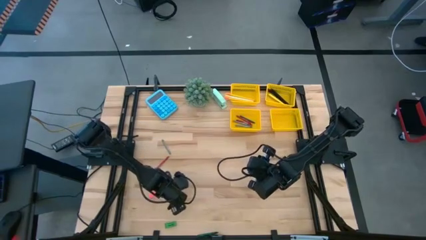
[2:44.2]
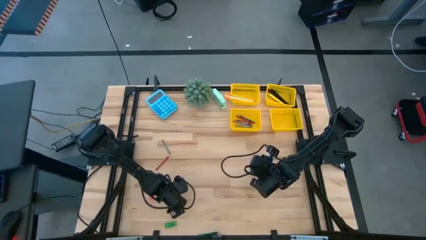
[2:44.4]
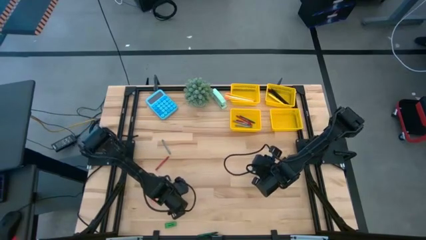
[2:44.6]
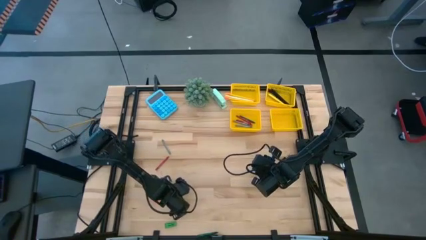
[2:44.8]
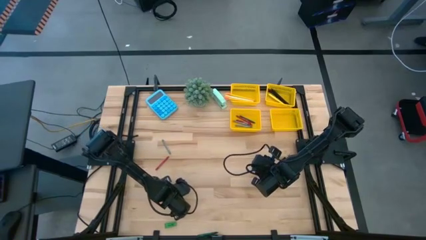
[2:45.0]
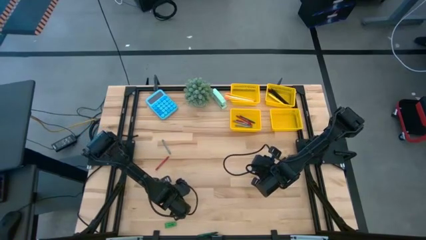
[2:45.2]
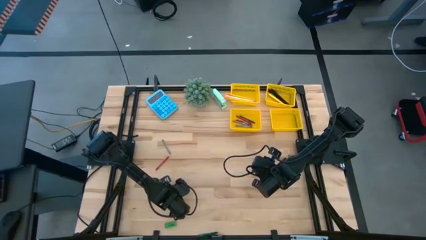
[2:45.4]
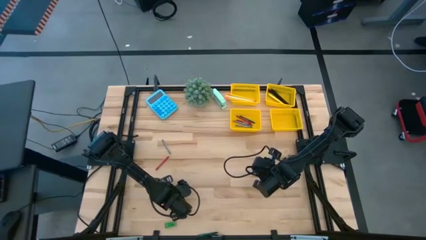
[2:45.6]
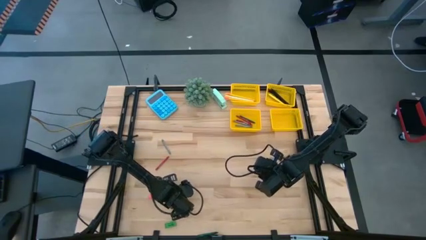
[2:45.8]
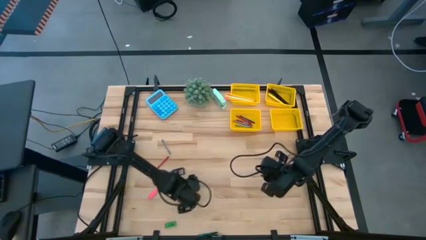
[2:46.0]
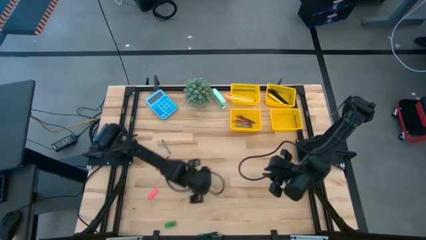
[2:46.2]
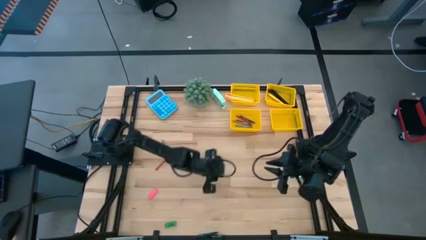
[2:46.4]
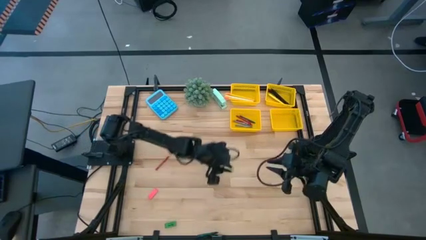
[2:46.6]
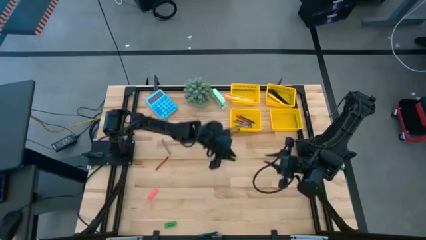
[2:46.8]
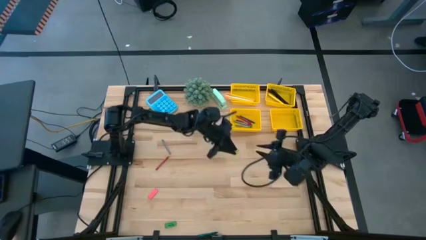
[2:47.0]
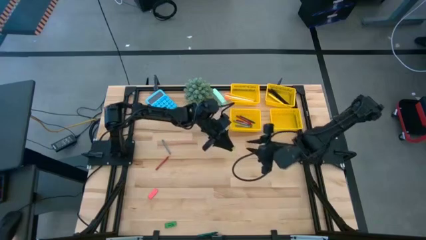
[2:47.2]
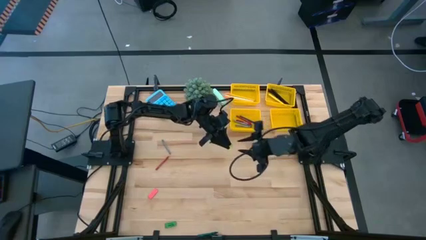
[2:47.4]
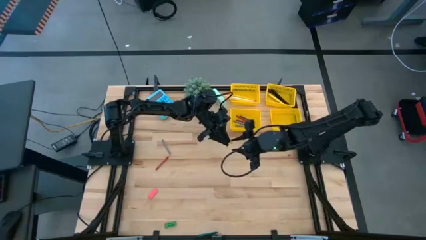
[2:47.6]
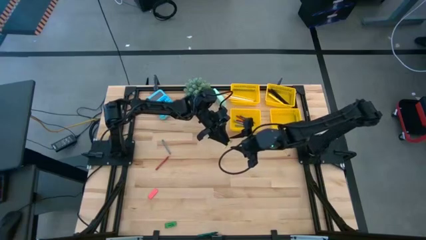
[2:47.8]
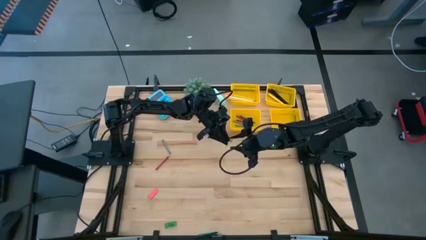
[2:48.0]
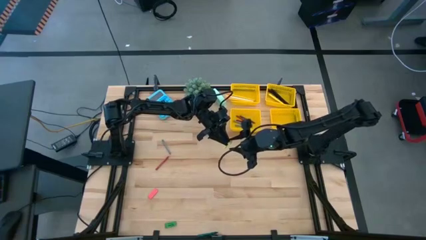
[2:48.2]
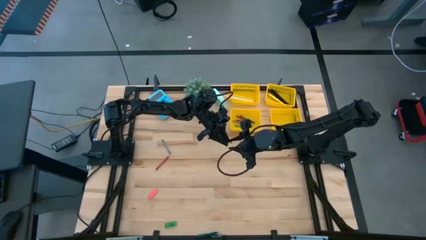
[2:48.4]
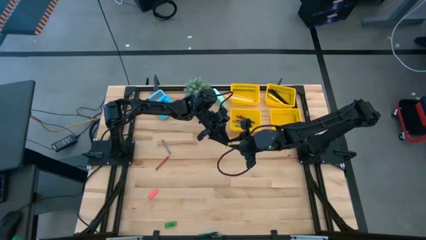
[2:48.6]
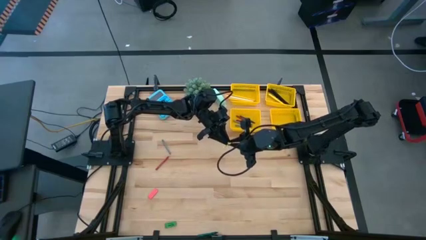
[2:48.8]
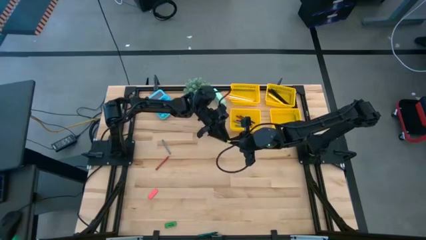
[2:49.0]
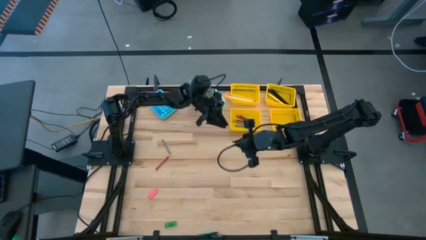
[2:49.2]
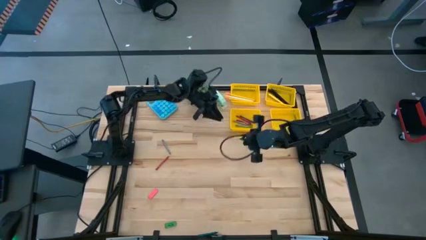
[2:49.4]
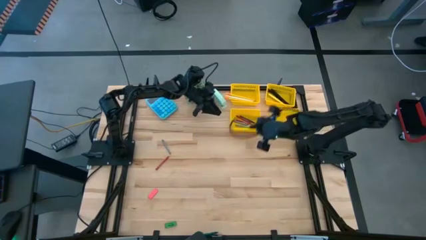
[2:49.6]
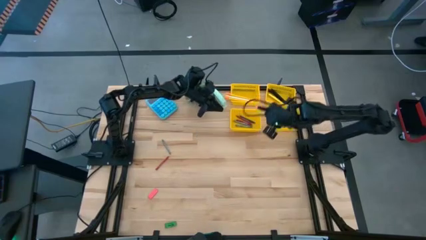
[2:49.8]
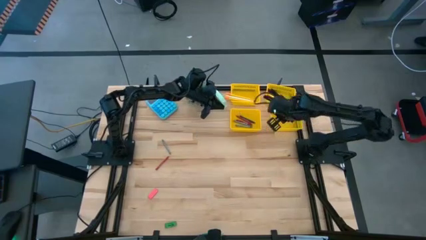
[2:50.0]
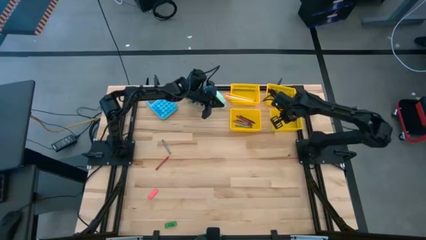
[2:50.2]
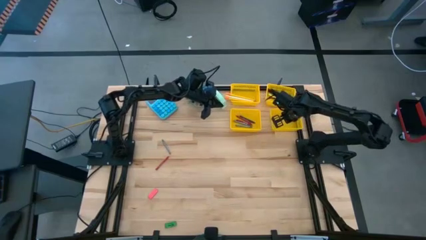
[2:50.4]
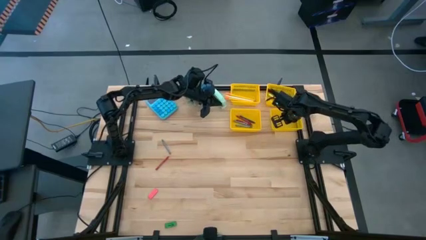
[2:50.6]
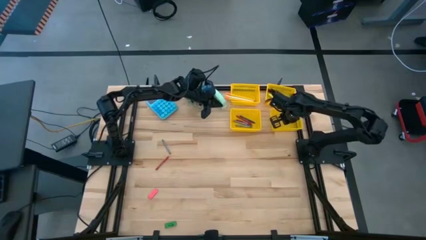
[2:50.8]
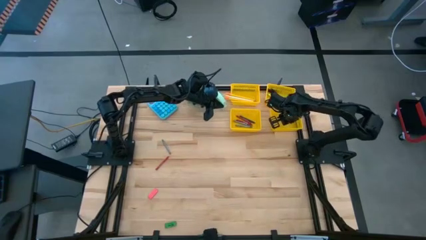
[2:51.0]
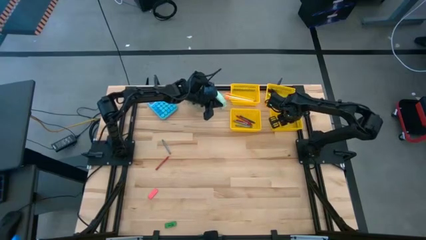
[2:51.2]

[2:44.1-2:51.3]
Task: Sort crayons/erasers/pens/pencils in bins
Put the yellow eraser into the bottom right yellow bin

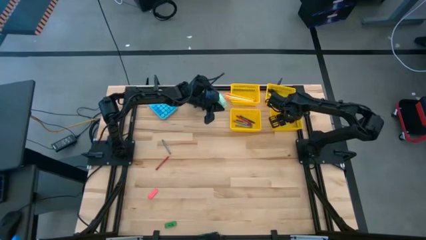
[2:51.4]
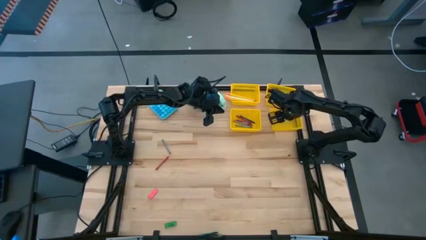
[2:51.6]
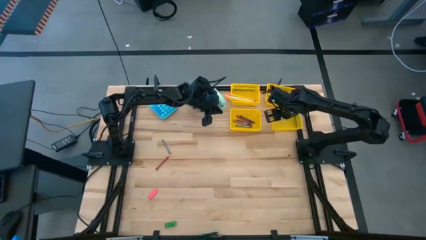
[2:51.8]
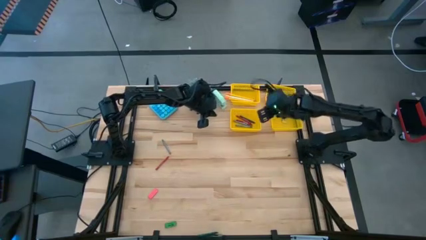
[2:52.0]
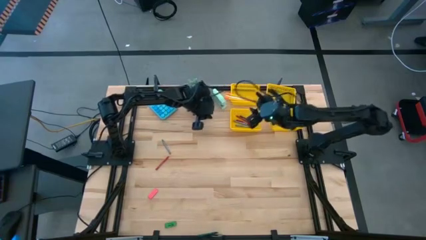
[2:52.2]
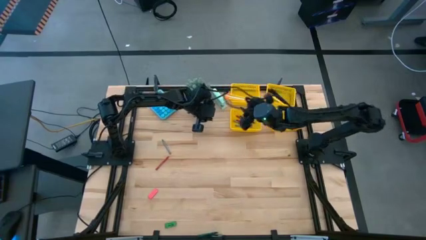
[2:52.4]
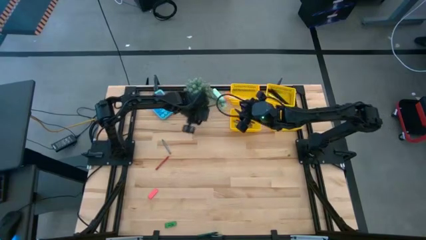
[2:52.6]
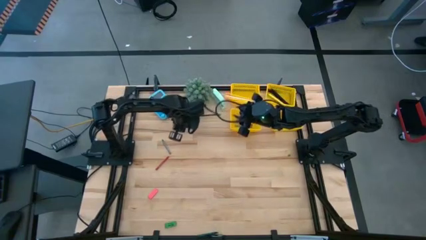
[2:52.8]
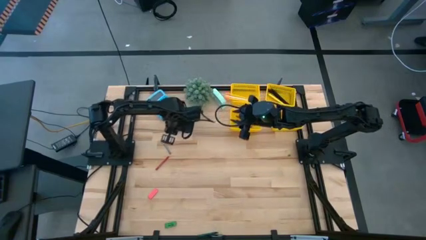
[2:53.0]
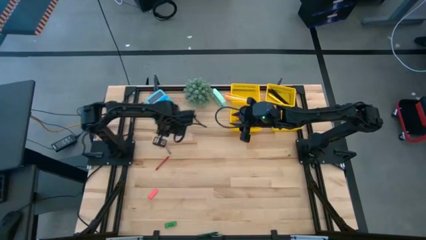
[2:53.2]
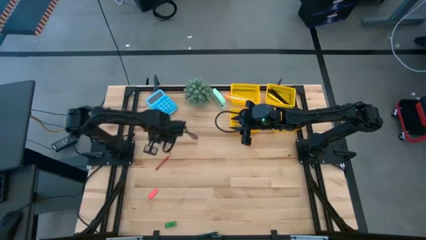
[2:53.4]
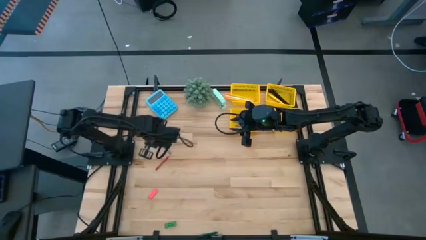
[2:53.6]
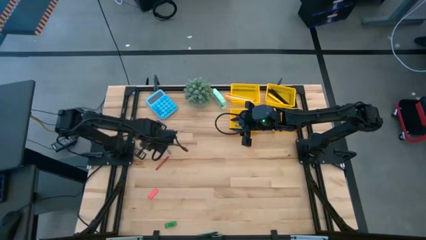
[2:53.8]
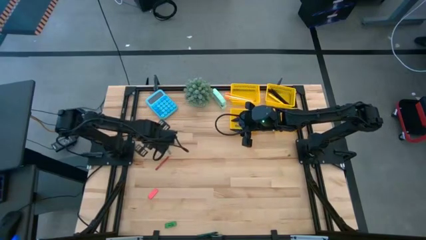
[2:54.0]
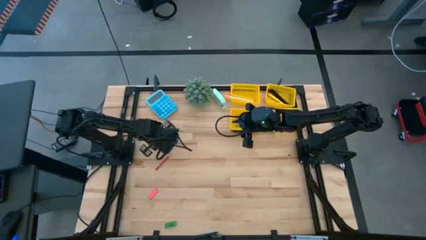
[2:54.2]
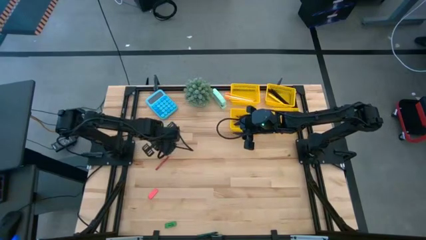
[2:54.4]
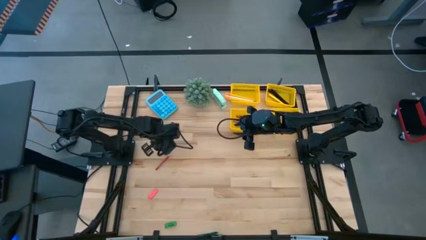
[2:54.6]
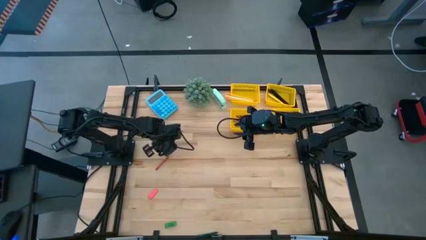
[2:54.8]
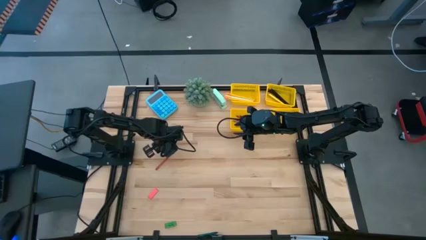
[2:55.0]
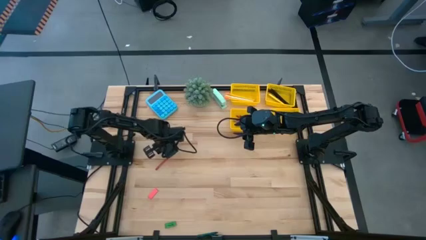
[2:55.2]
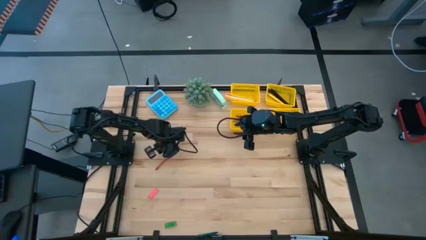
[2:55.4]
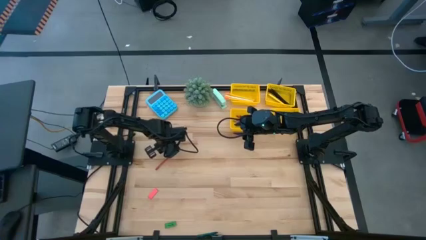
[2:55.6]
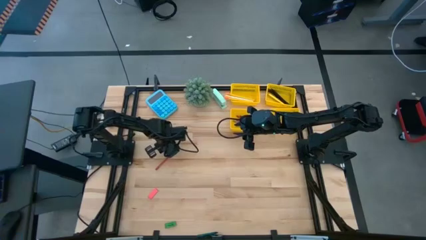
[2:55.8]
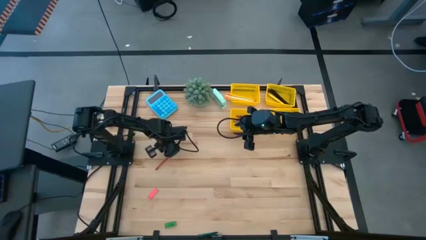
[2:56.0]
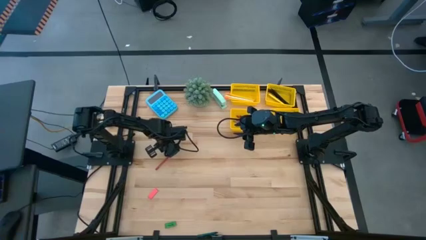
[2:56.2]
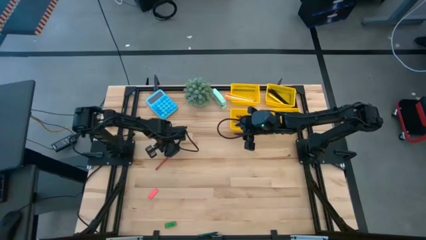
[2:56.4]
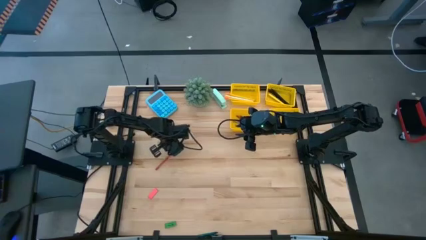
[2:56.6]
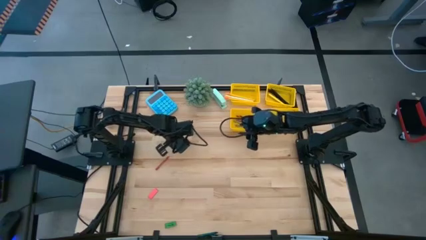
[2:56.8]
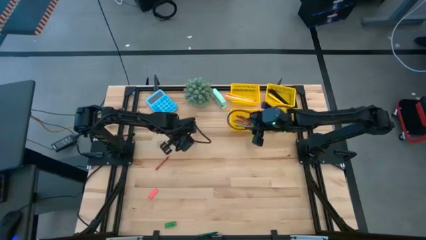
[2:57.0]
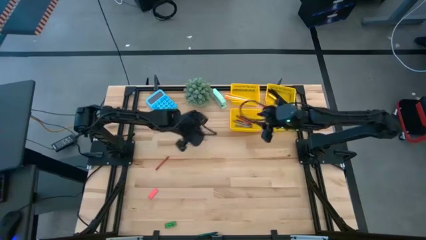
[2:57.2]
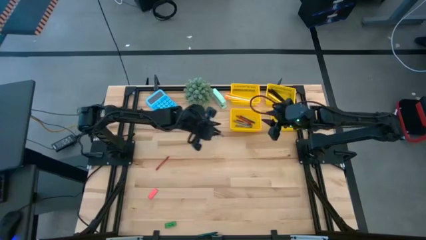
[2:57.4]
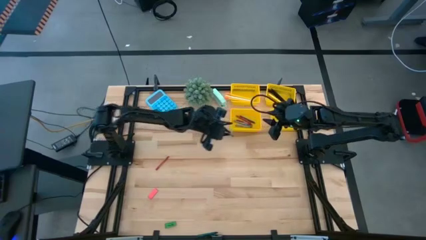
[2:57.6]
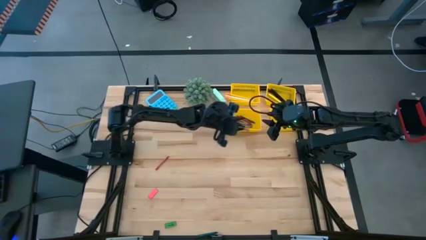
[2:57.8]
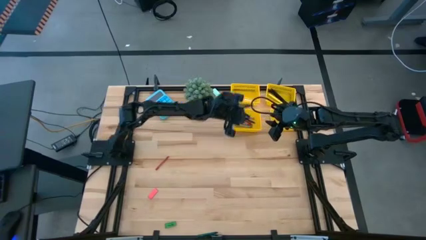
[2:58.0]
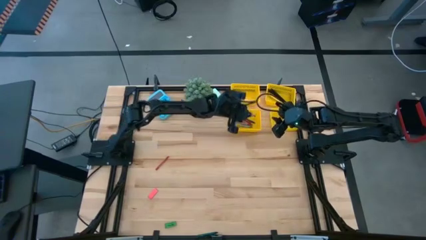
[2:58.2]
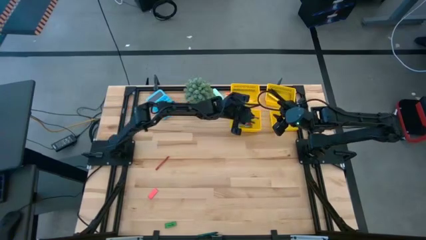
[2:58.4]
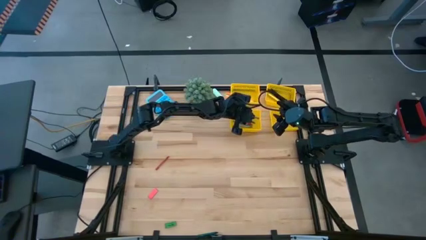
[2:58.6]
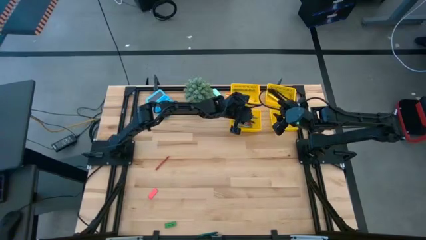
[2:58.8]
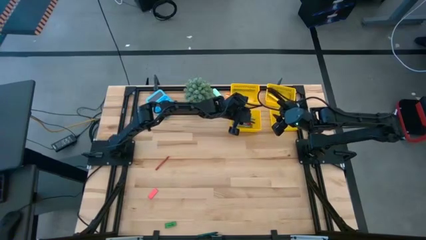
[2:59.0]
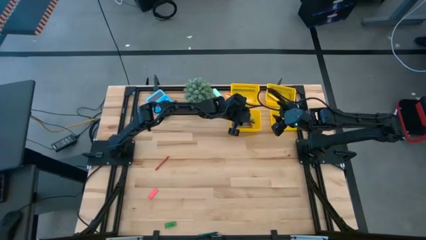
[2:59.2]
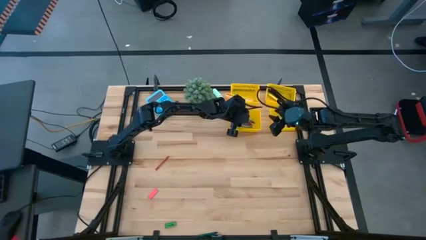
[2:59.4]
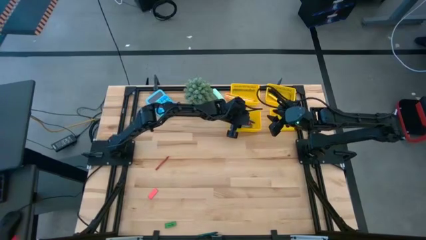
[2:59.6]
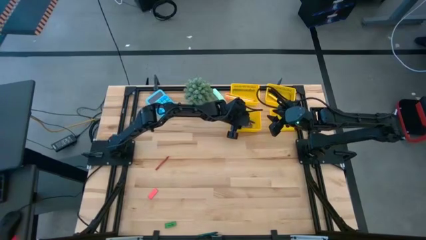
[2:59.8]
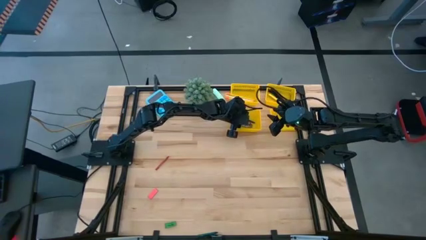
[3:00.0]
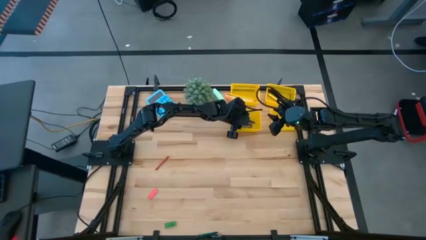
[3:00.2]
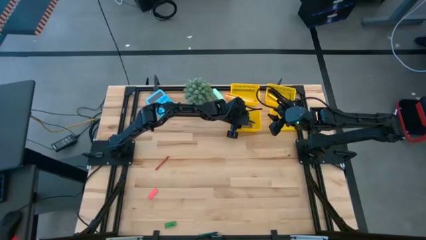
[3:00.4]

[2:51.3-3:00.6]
Put the gray crayon into the bottom left yellow bin
